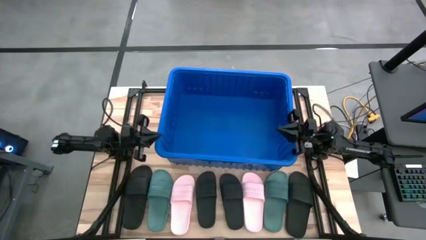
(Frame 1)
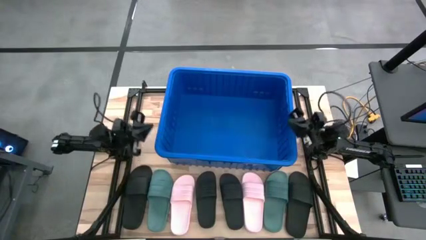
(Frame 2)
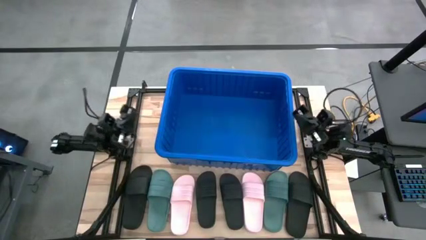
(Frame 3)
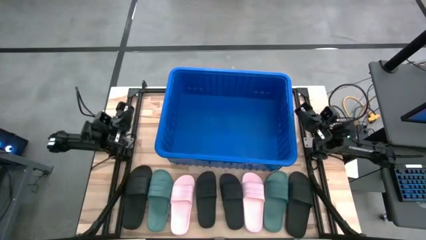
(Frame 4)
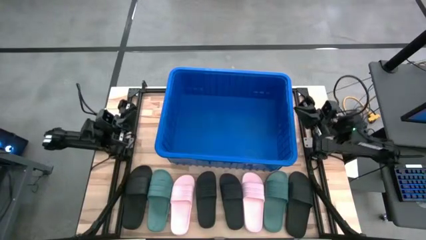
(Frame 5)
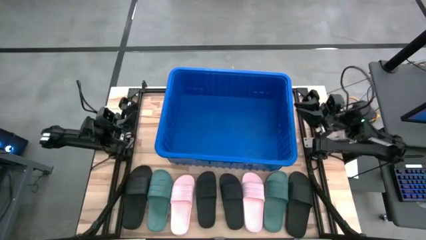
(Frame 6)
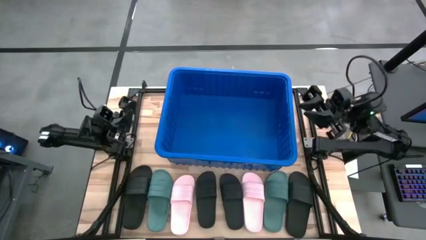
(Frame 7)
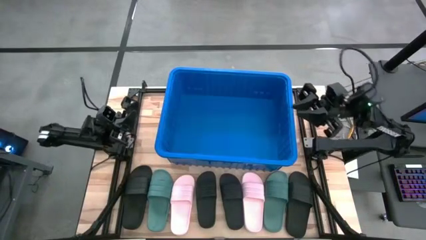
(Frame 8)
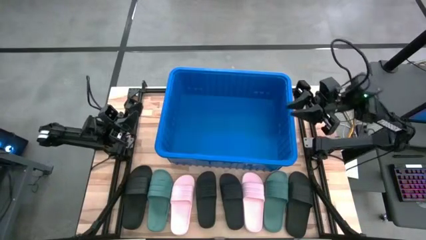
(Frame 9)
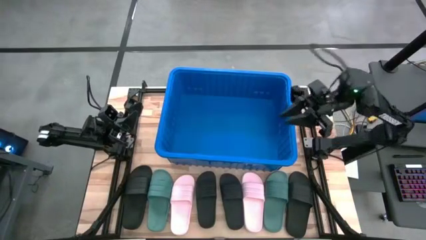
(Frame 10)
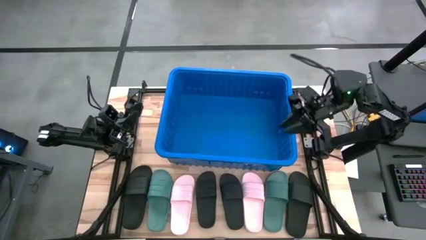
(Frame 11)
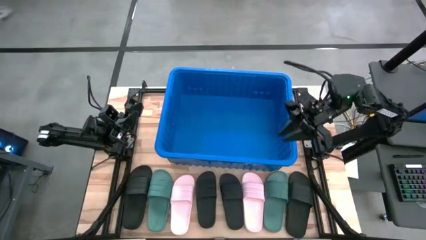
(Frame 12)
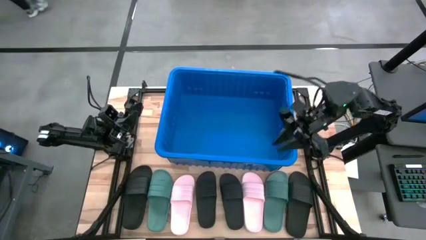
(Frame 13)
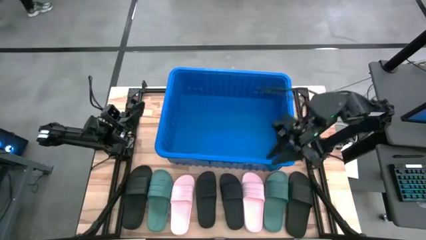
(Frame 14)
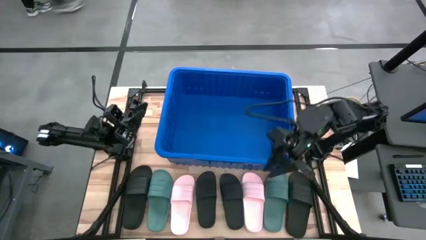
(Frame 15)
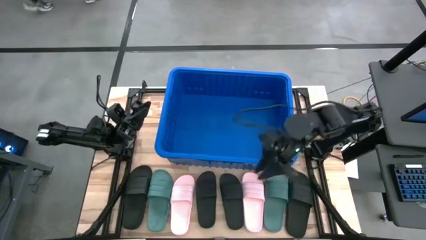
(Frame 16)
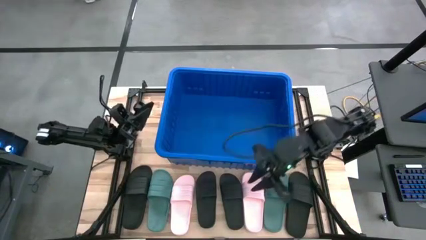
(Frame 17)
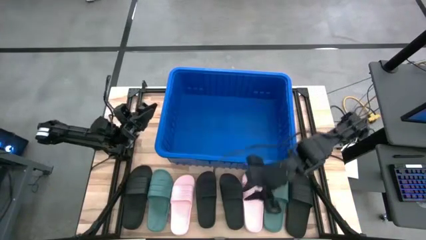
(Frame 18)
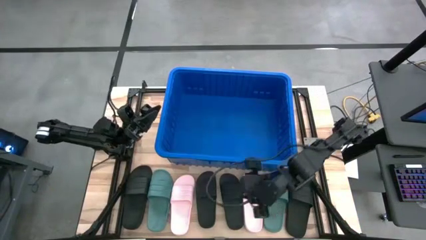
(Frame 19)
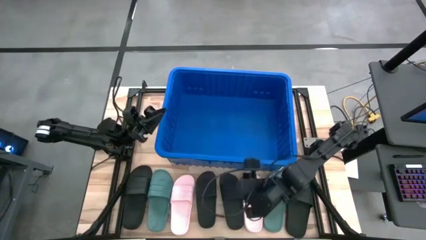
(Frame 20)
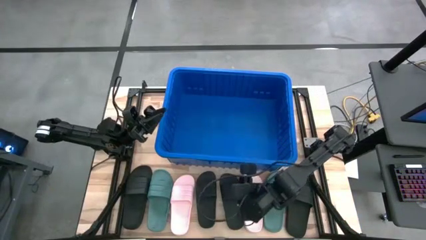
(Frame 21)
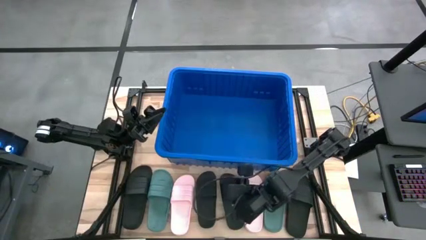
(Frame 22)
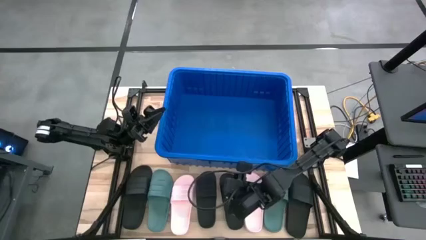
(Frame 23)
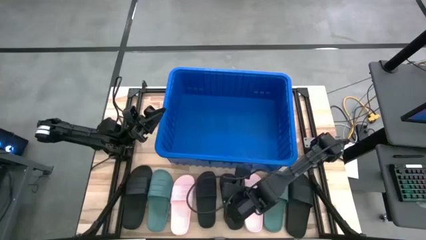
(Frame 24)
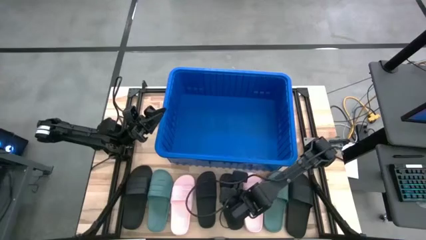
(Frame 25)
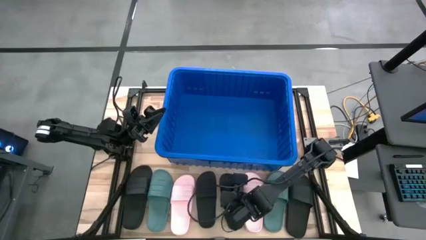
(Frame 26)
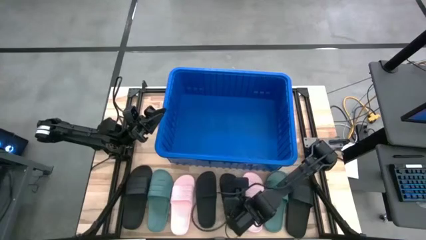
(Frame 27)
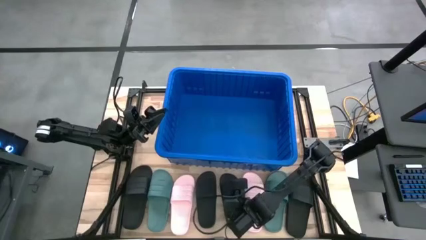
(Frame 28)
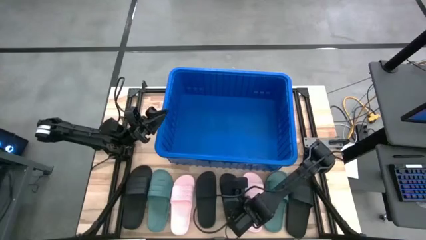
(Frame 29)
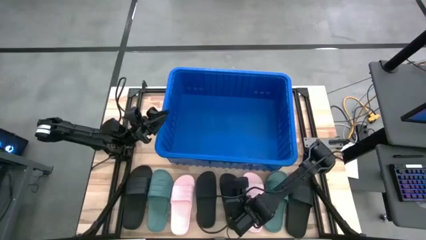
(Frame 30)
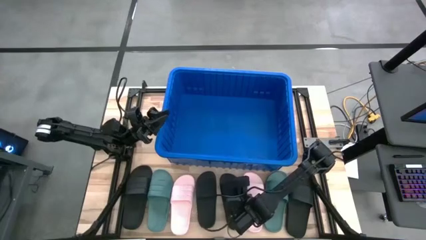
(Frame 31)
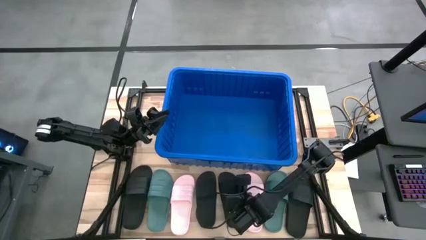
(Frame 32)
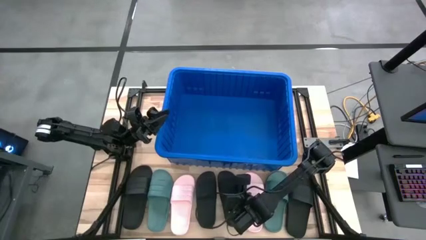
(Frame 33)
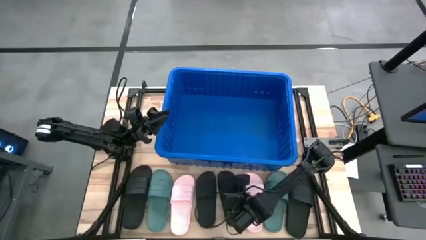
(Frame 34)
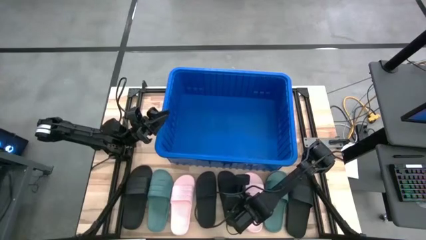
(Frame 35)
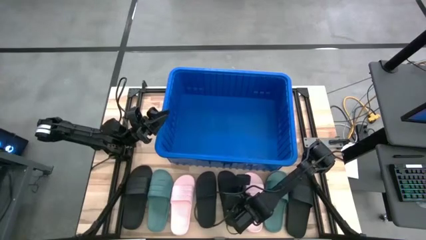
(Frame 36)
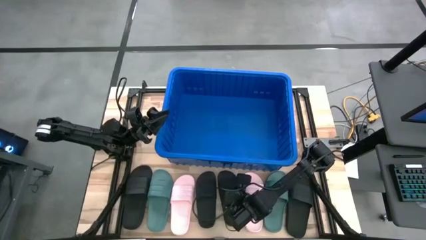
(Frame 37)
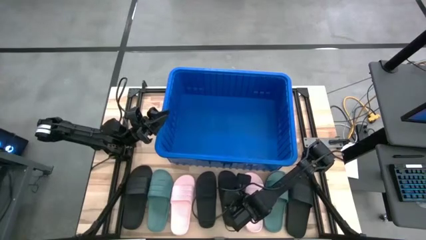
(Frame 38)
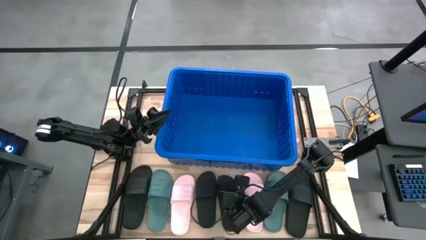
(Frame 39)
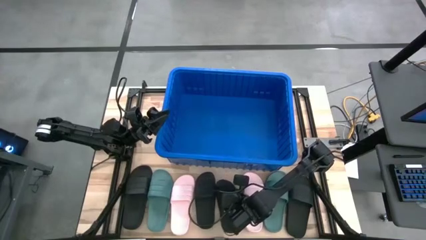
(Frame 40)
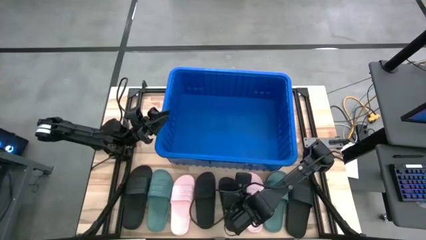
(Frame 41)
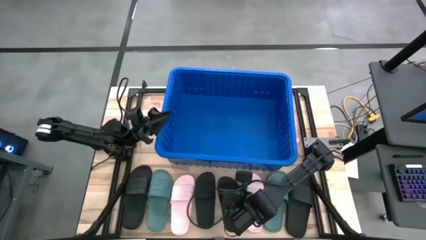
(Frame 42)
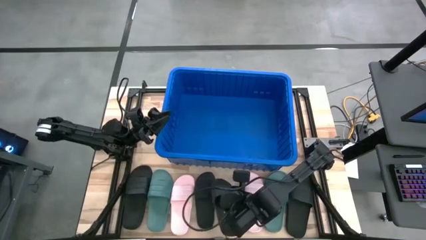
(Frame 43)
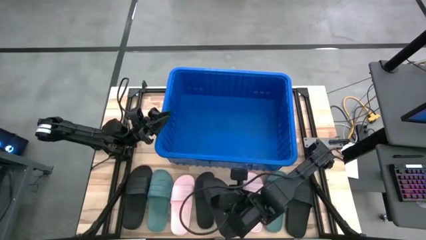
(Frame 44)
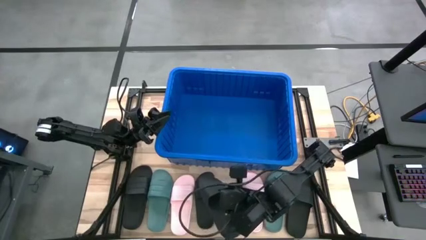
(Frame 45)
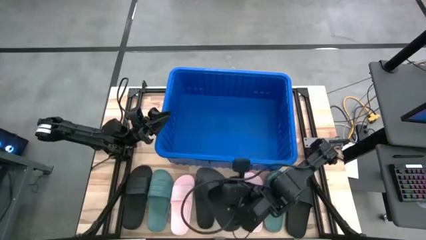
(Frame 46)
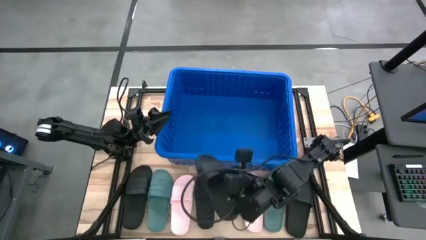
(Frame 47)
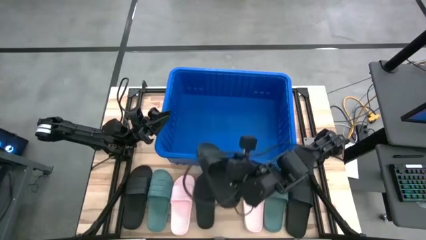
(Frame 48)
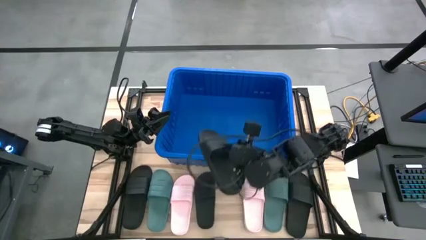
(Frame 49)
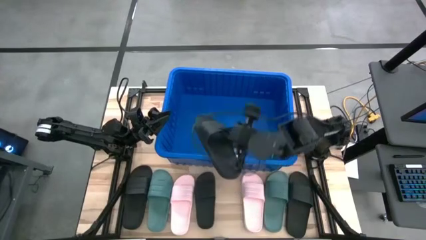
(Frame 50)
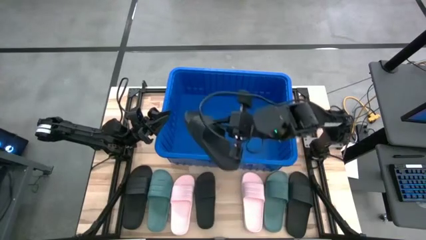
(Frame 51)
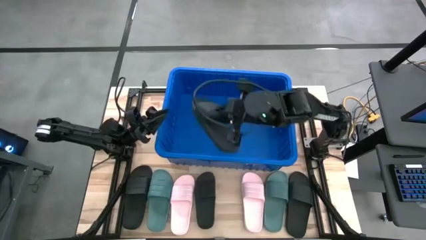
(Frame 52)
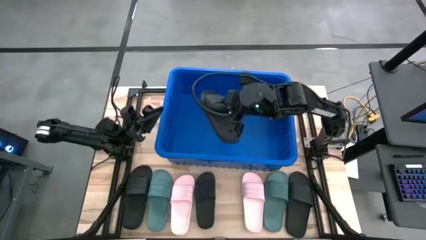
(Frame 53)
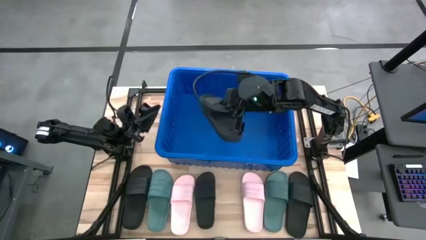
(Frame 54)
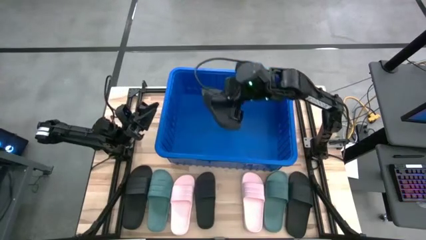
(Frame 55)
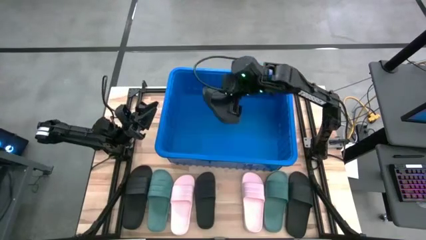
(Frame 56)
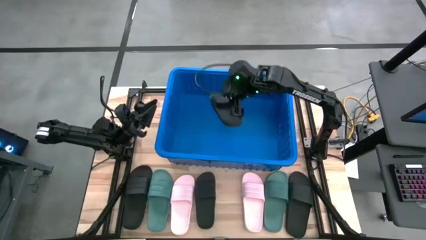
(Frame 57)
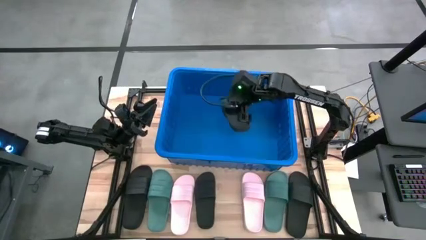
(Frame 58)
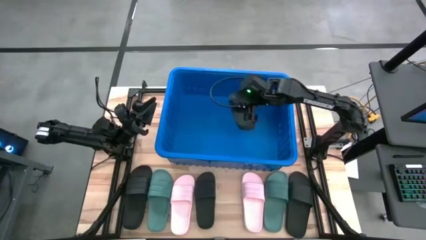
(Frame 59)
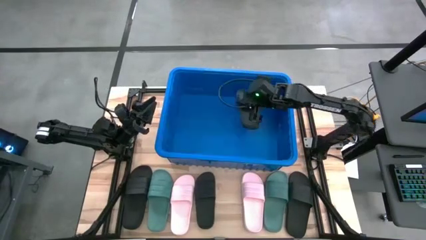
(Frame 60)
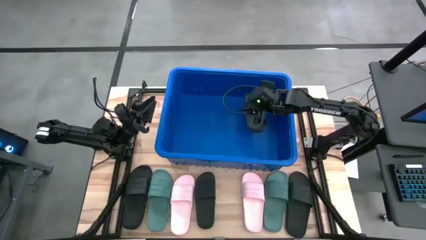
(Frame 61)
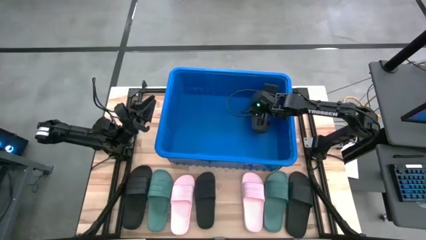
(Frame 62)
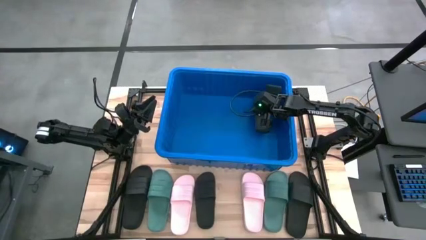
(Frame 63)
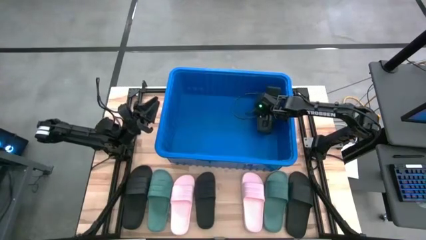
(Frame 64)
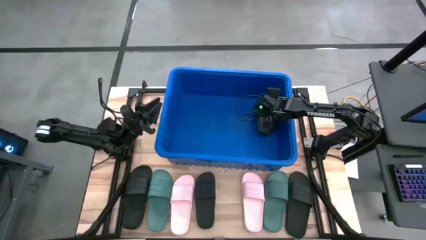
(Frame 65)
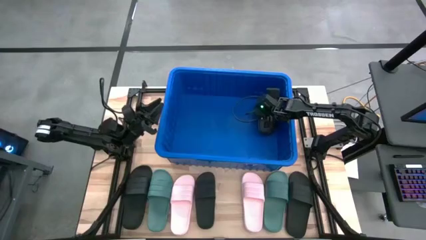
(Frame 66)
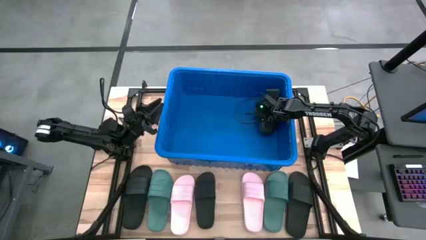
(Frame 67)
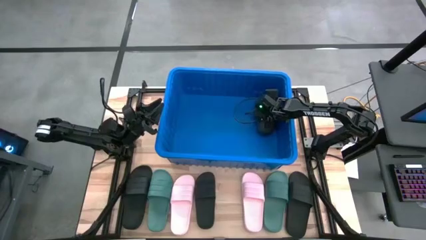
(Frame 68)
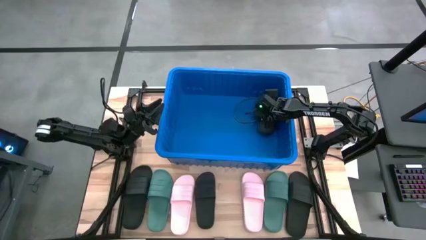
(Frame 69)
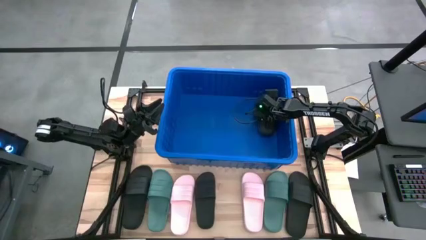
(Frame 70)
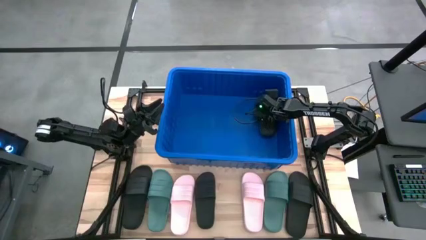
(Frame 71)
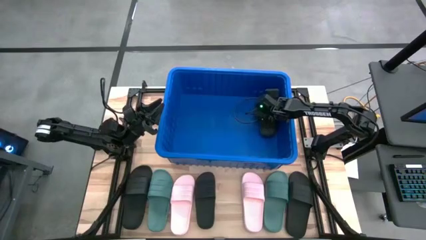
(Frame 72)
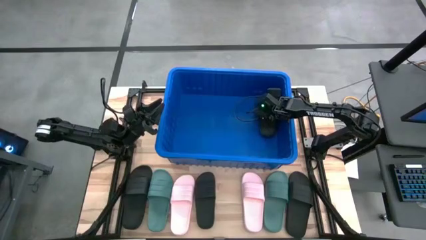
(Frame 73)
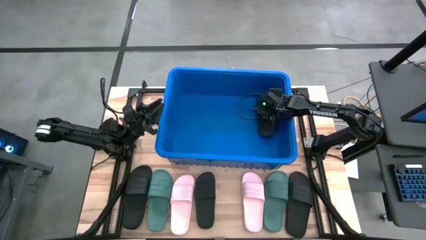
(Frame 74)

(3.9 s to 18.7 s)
Task: Pick and place slides into bin
Put the black slide into the blue bin
